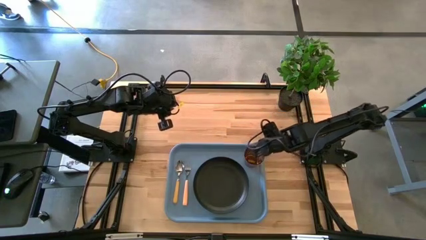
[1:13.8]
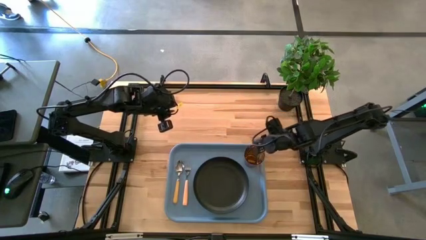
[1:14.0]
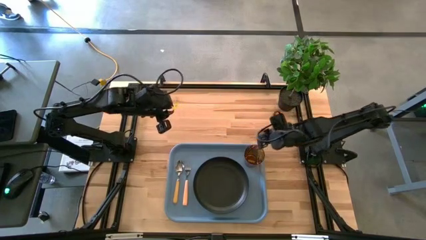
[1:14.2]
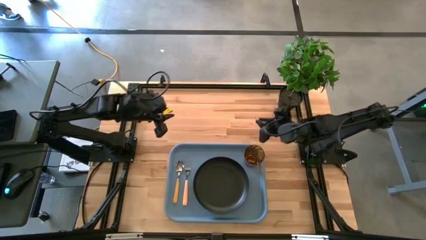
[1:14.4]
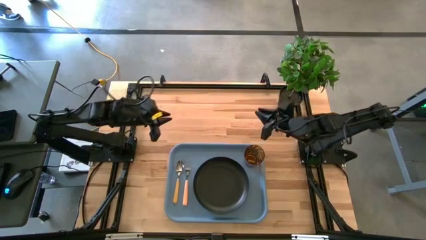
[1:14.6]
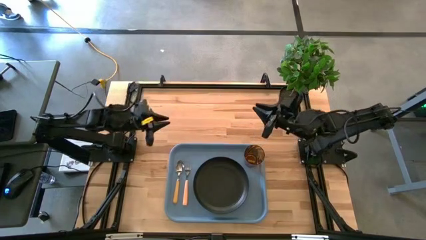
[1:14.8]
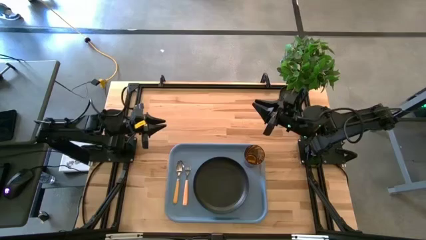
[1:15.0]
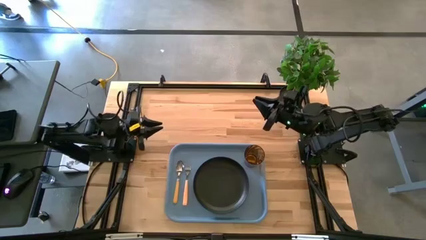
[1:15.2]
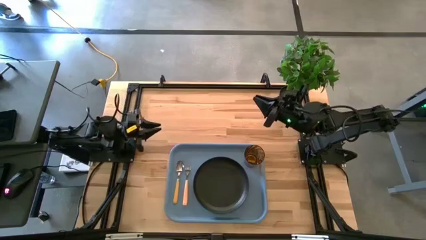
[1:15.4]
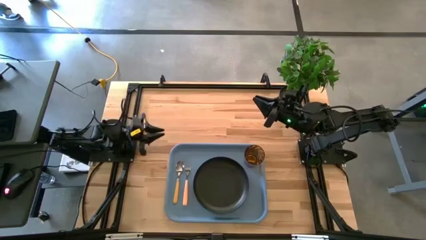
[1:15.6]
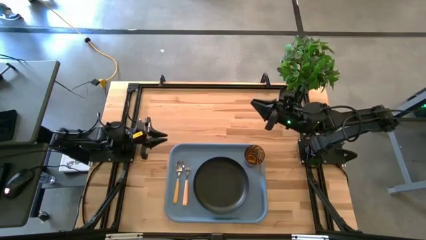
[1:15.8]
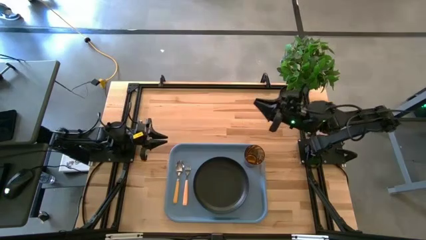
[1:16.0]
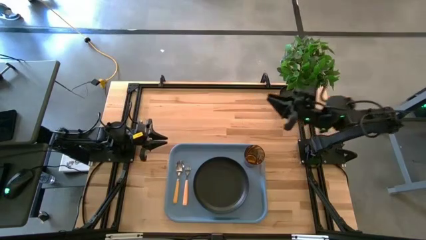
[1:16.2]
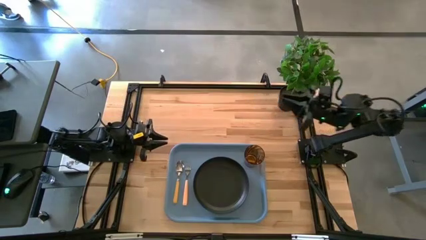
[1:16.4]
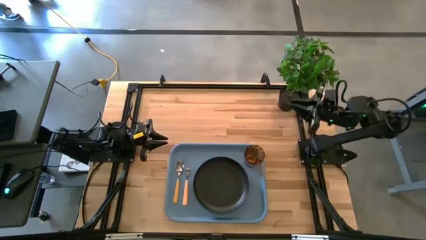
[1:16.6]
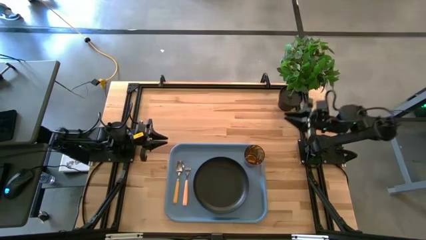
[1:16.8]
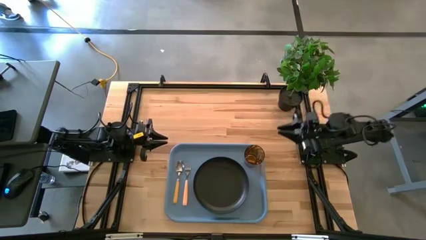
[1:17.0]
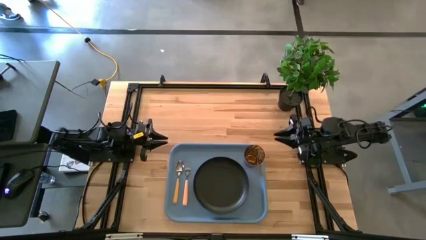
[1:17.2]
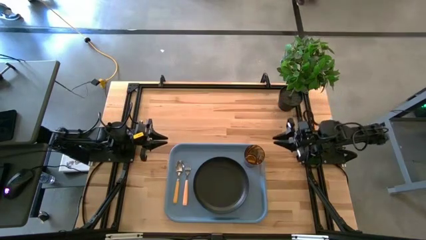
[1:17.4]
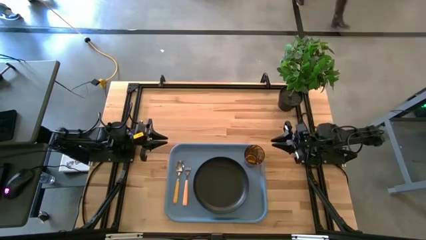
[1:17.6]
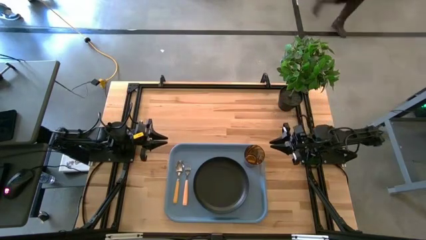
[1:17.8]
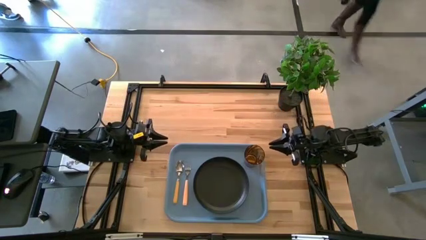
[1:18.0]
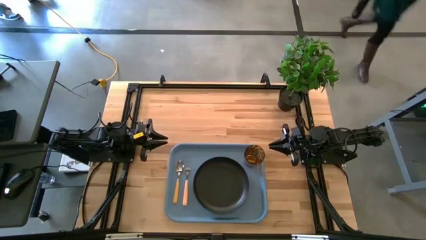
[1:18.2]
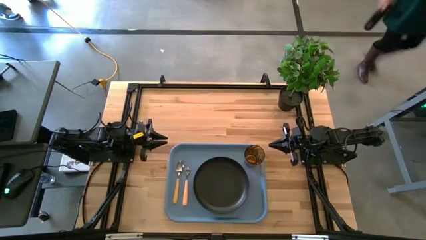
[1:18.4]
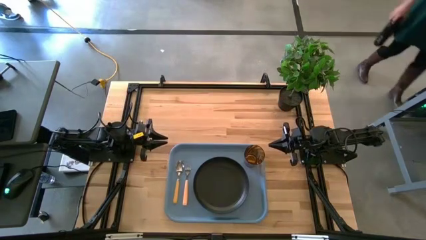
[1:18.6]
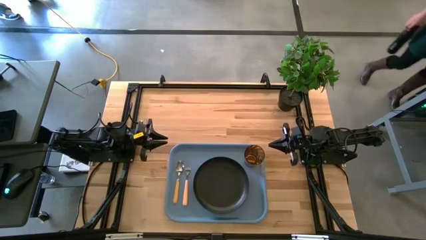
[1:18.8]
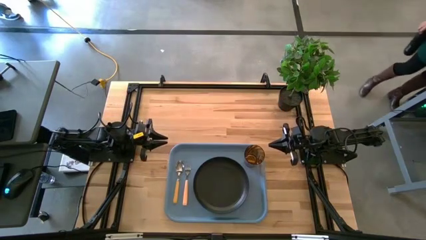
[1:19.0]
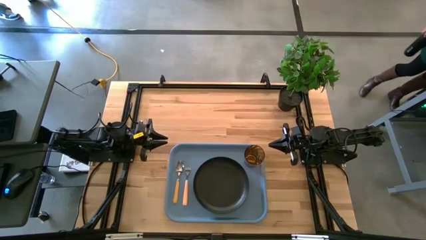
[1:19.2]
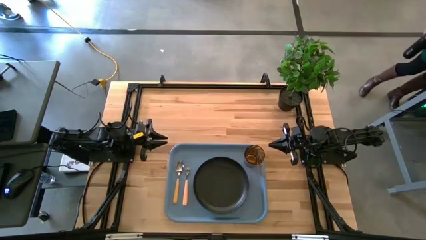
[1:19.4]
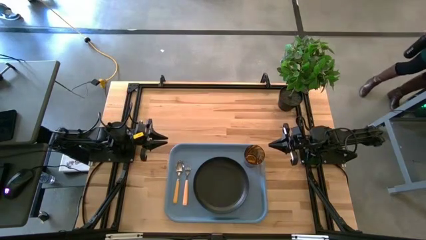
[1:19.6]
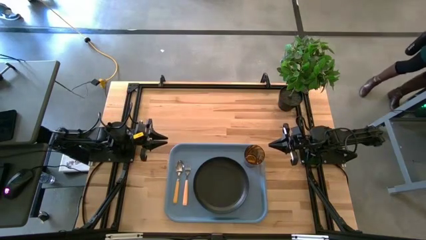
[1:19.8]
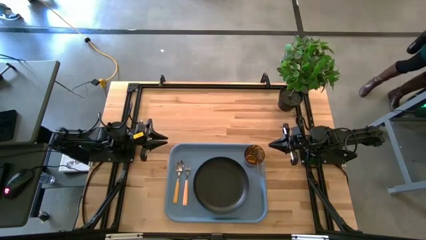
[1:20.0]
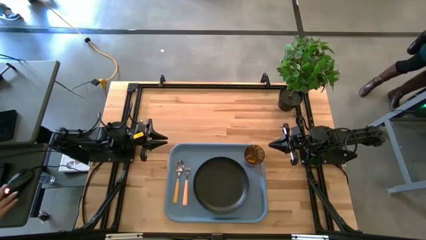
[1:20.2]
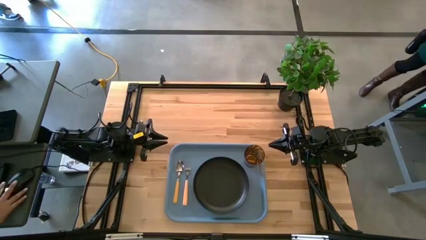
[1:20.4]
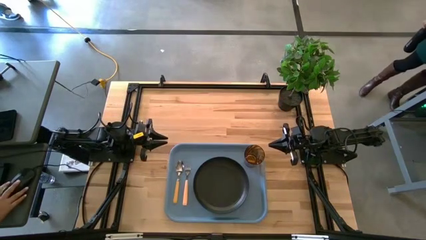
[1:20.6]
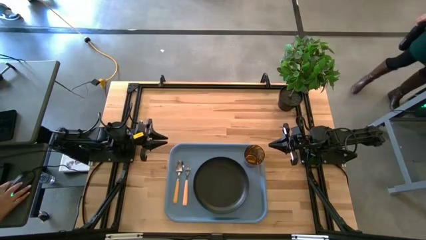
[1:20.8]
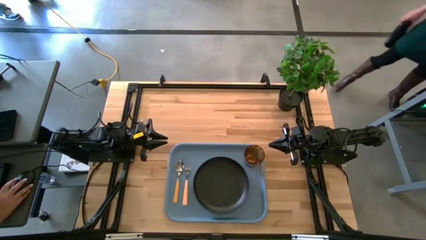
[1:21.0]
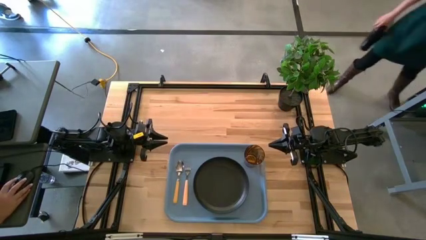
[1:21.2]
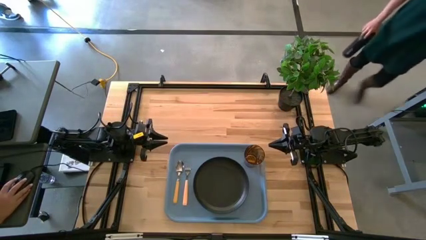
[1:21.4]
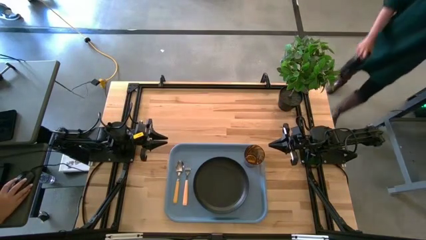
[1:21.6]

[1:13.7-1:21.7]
Task: Pick and place plate/cup/fork/spoon on tray
Return to Home Position

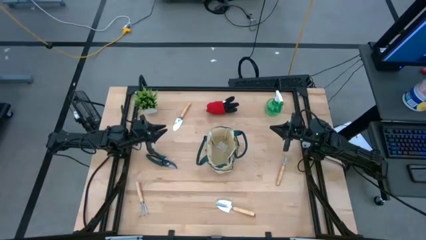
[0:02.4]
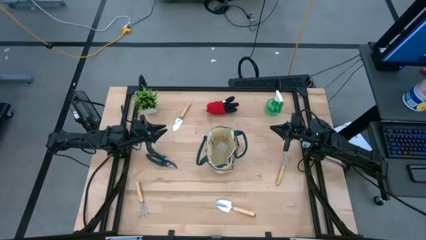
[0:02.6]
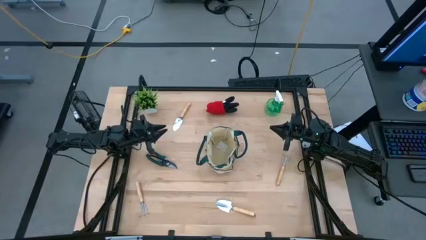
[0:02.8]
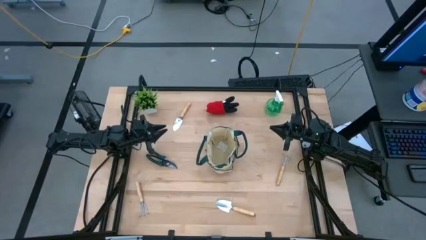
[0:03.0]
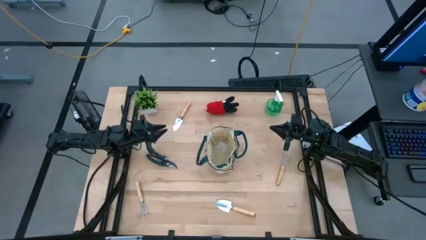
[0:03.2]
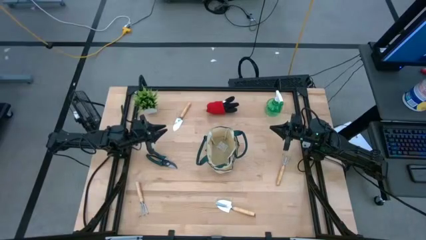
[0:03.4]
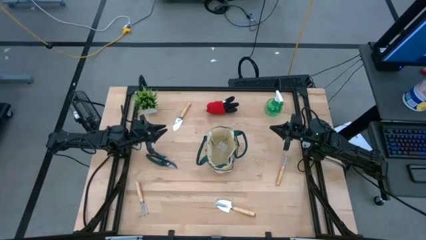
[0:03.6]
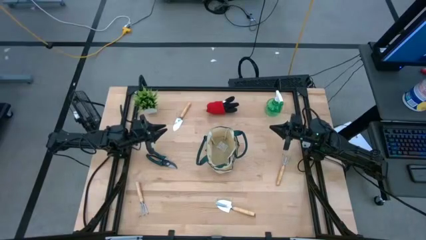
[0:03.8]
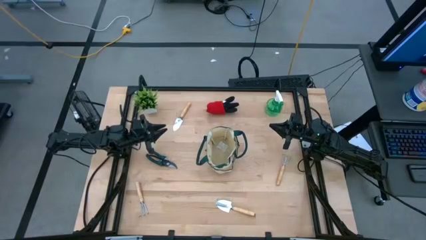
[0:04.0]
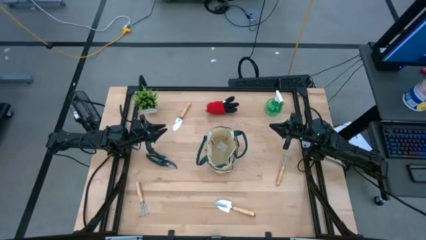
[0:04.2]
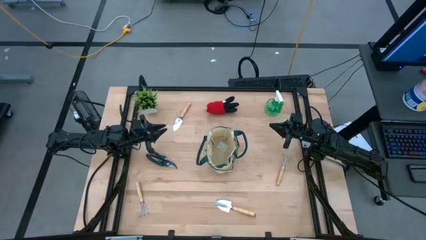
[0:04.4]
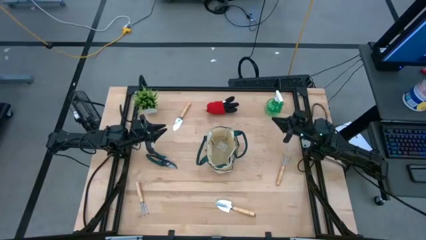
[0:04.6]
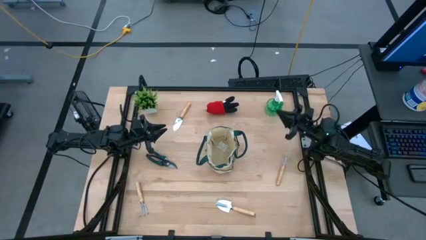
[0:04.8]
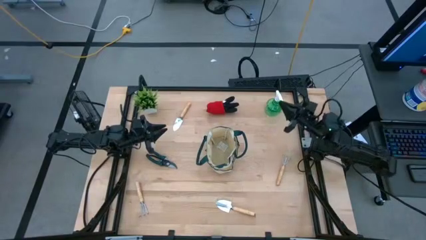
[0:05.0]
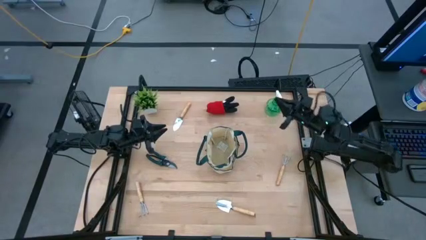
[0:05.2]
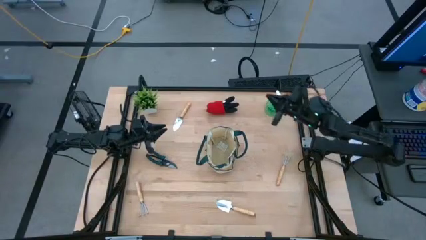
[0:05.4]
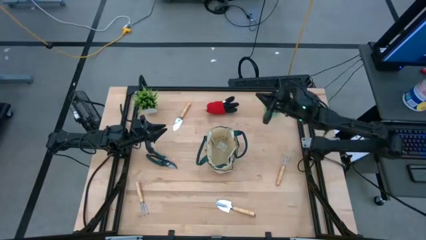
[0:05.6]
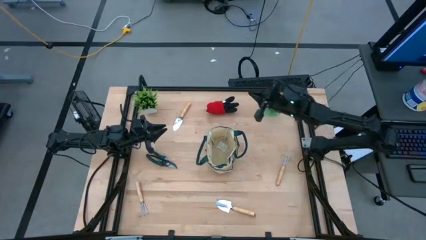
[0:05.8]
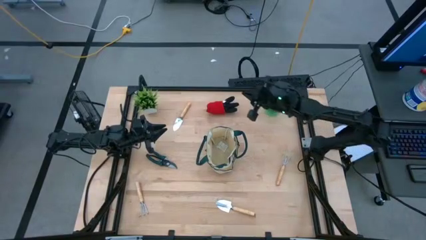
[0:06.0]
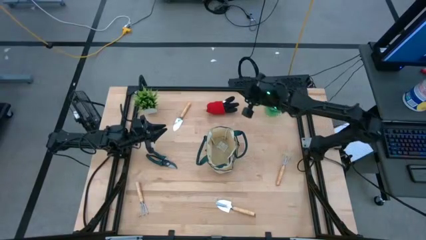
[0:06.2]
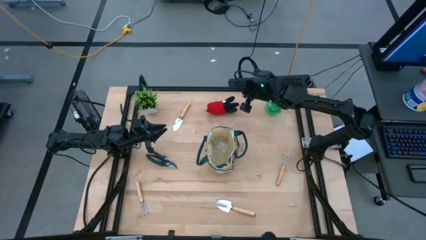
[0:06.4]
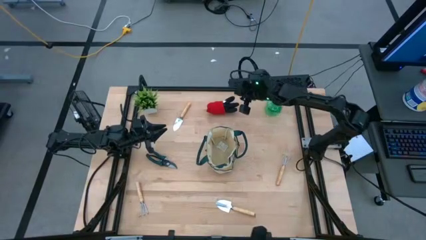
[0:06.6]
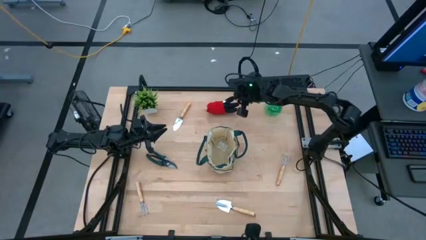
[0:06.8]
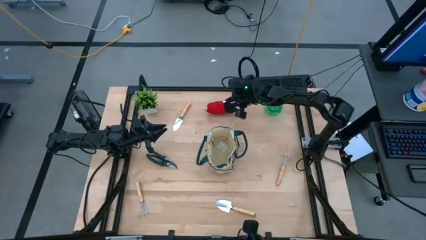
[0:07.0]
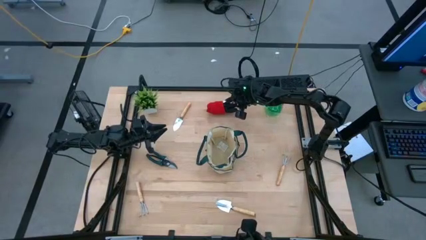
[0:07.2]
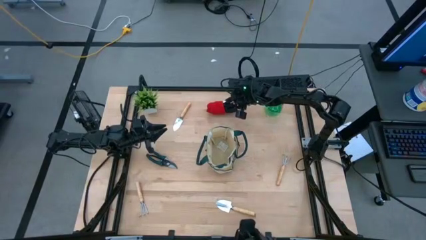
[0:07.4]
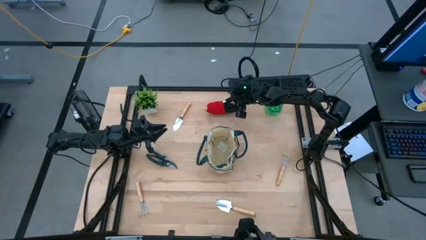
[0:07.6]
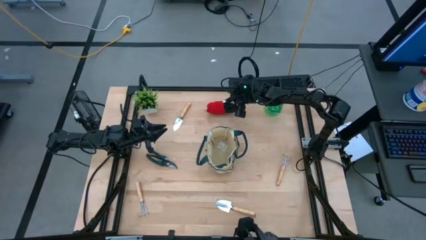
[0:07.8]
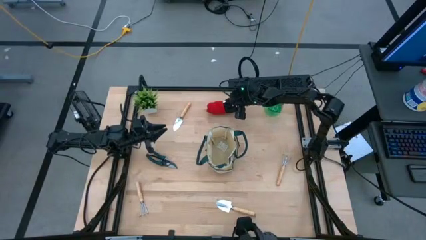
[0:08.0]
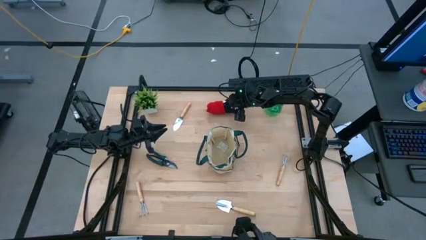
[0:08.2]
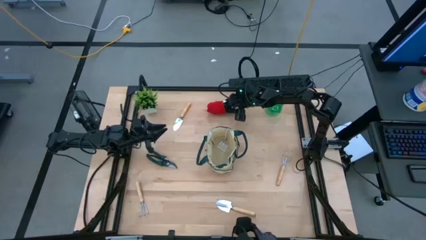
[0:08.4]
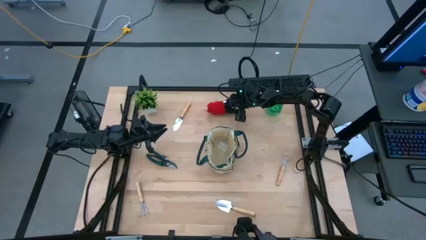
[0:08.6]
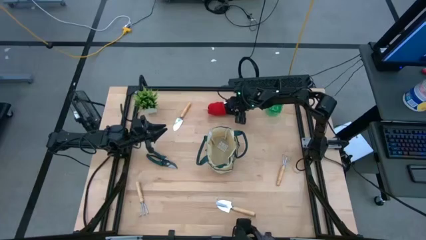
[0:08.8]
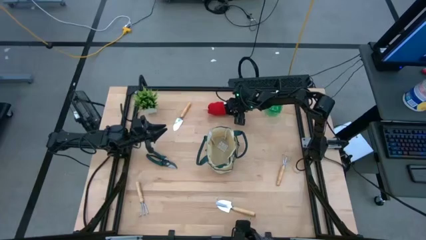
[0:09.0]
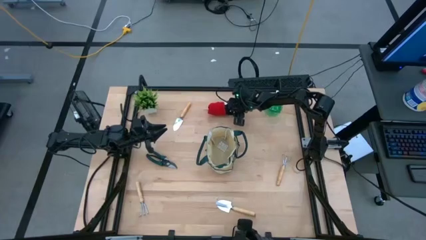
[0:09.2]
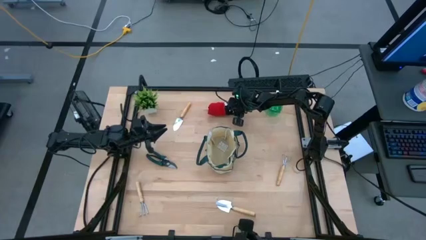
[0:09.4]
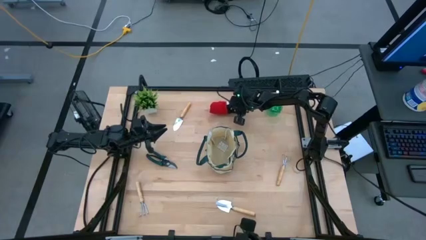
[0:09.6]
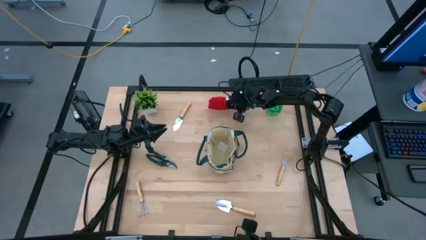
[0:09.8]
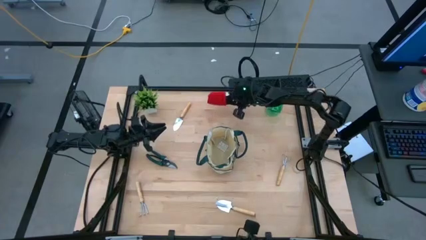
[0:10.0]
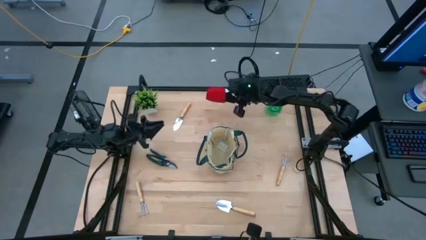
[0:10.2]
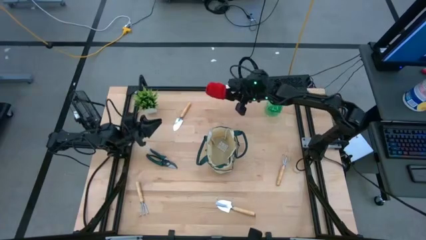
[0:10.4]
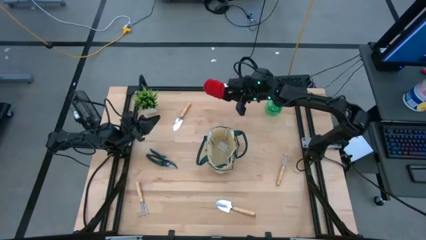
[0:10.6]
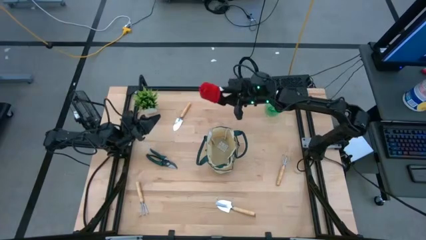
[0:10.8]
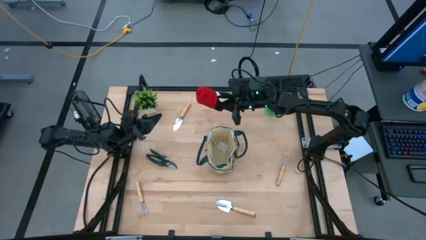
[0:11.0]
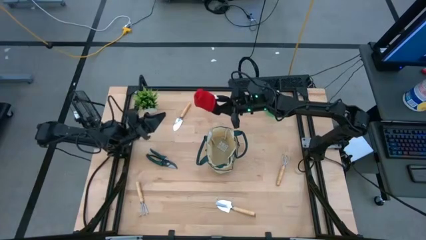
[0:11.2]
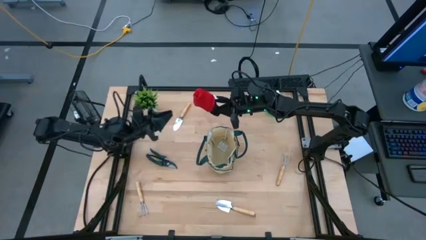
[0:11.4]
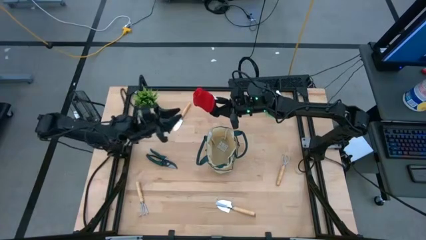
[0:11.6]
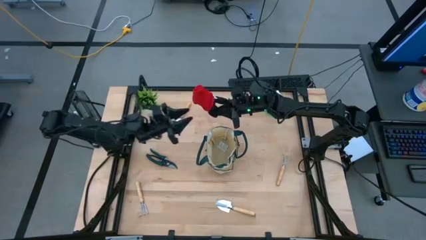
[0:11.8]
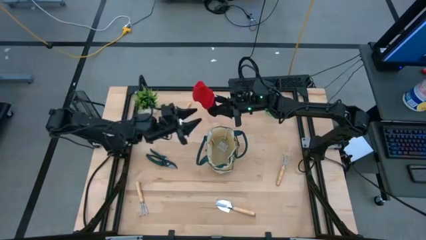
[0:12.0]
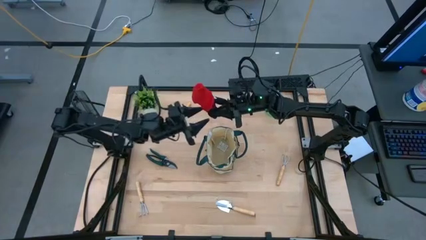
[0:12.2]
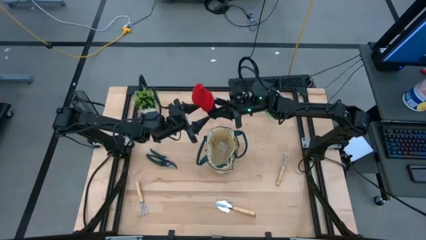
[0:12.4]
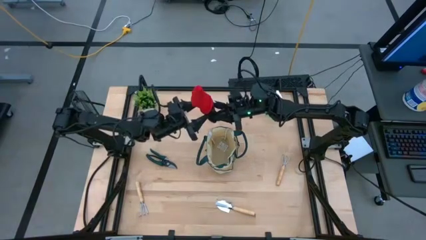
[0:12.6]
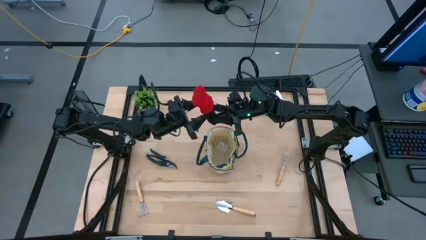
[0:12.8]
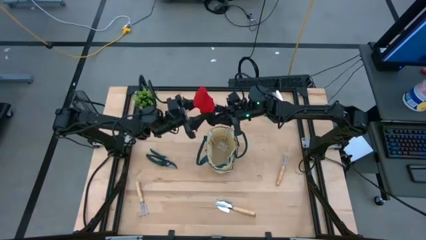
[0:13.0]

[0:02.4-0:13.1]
Task: Pick & Place Garden tools in Gardening bag
Put the red gloves into the light brown gardening bag
